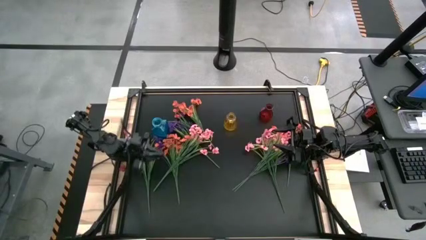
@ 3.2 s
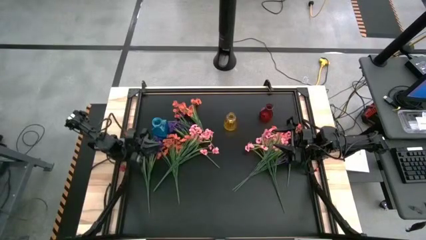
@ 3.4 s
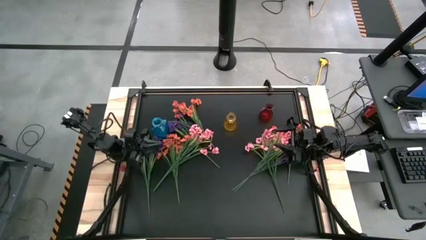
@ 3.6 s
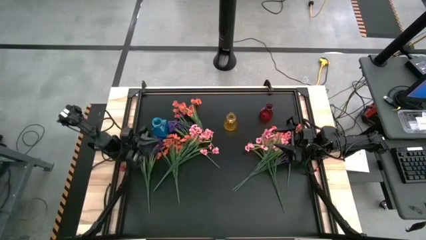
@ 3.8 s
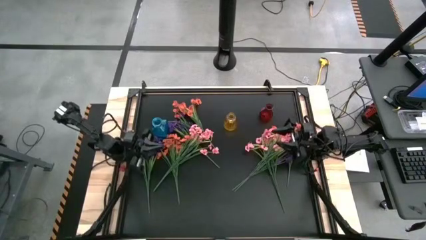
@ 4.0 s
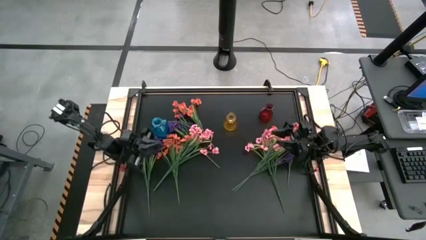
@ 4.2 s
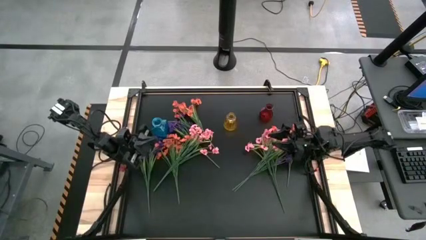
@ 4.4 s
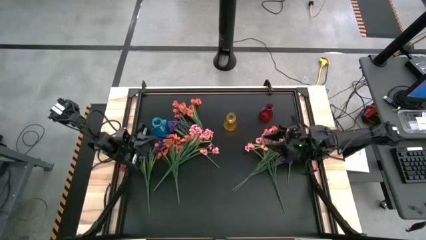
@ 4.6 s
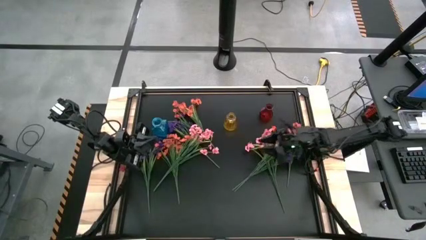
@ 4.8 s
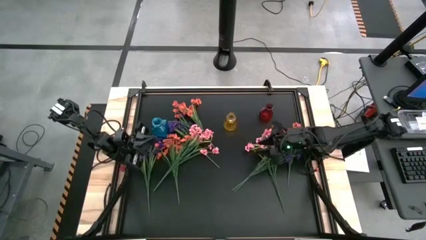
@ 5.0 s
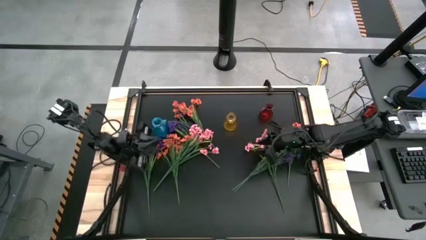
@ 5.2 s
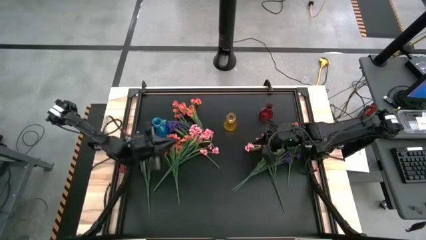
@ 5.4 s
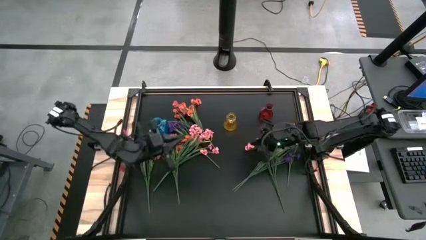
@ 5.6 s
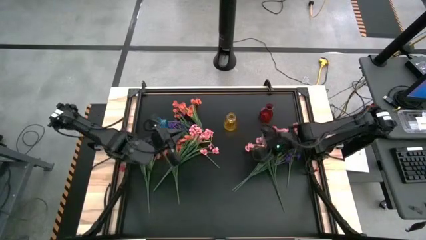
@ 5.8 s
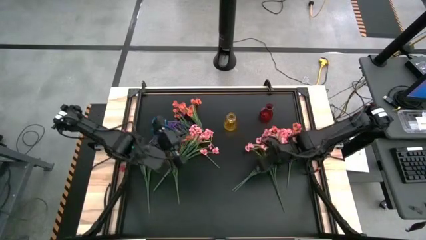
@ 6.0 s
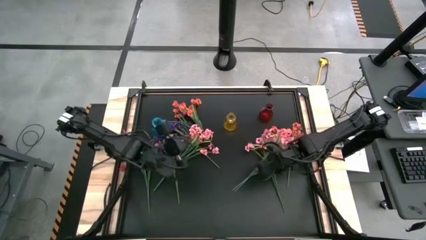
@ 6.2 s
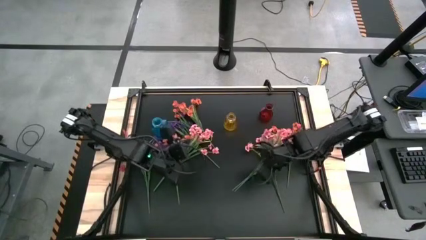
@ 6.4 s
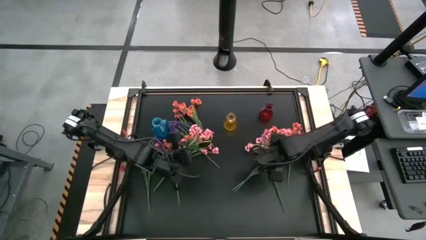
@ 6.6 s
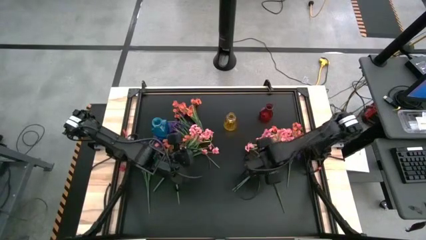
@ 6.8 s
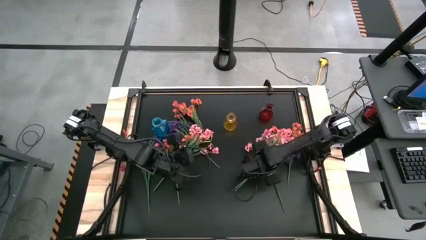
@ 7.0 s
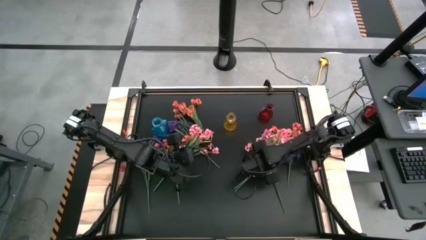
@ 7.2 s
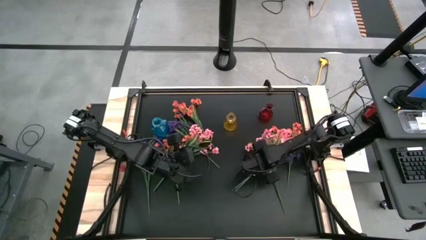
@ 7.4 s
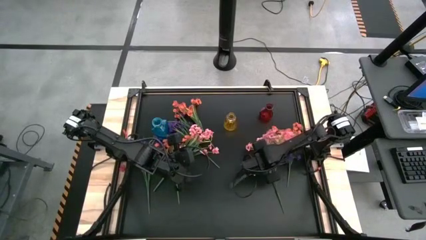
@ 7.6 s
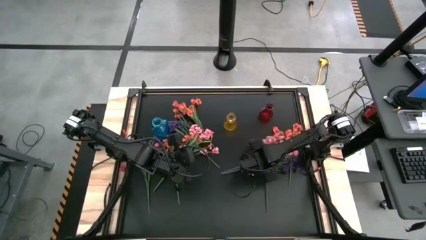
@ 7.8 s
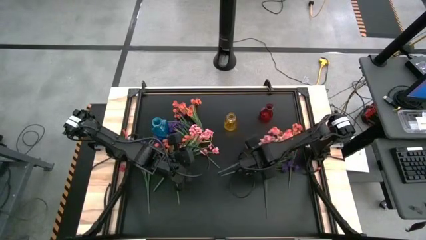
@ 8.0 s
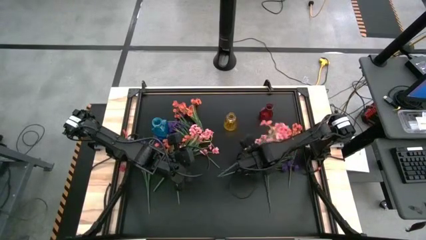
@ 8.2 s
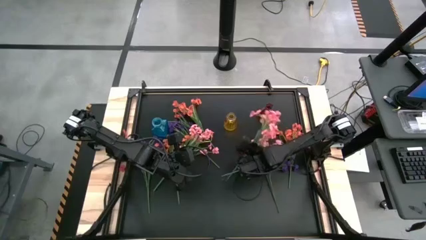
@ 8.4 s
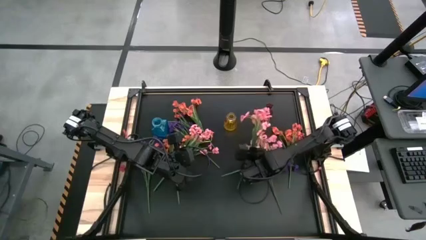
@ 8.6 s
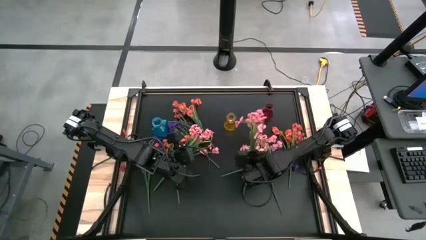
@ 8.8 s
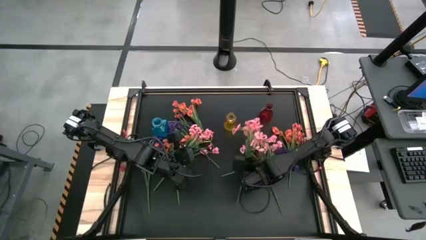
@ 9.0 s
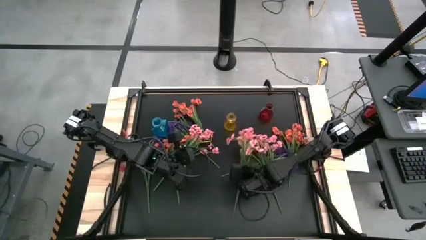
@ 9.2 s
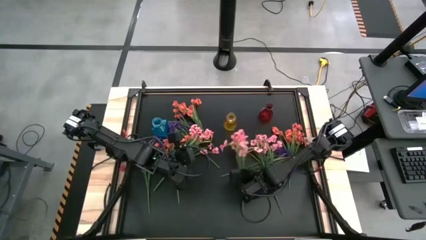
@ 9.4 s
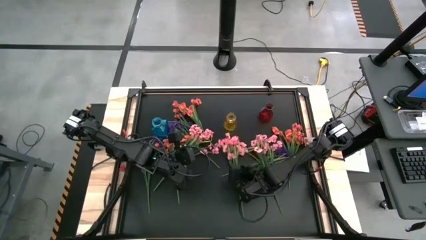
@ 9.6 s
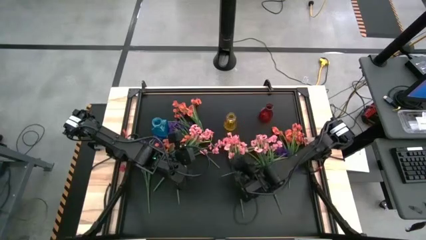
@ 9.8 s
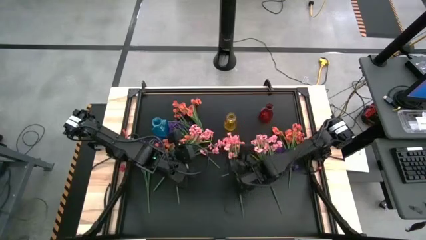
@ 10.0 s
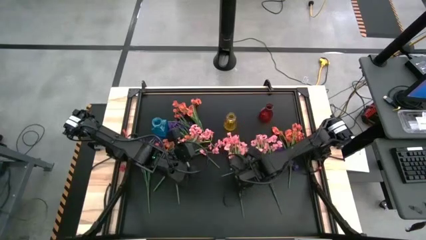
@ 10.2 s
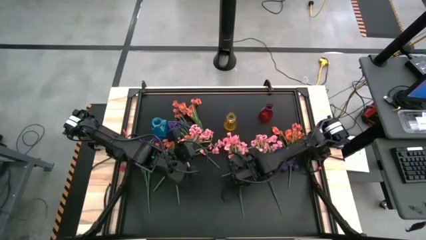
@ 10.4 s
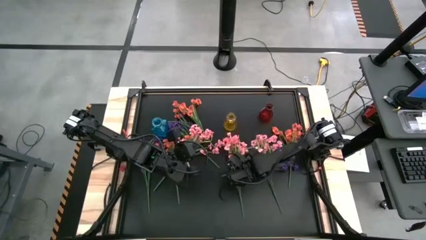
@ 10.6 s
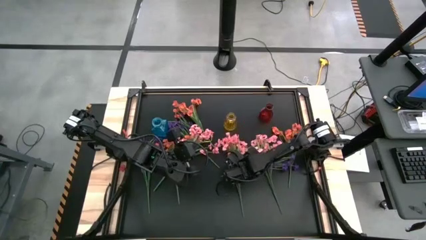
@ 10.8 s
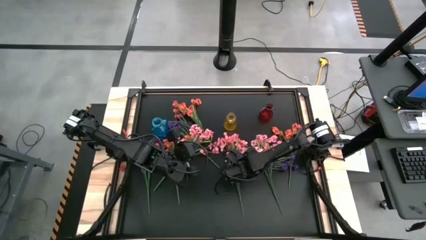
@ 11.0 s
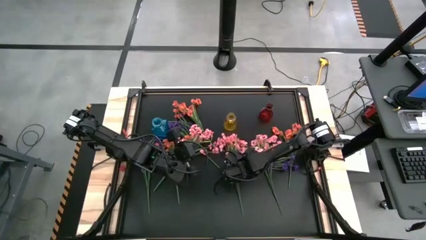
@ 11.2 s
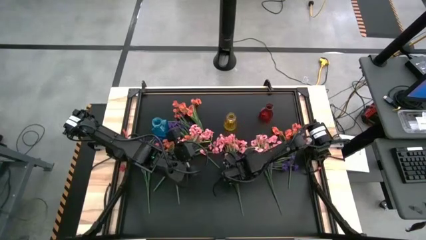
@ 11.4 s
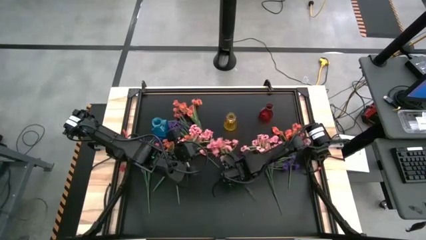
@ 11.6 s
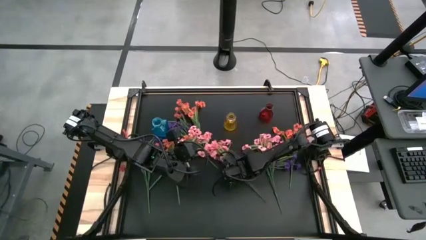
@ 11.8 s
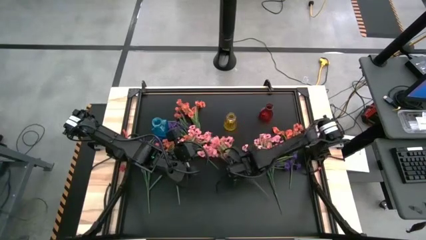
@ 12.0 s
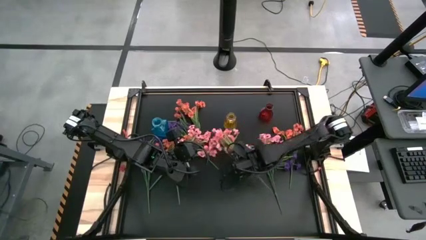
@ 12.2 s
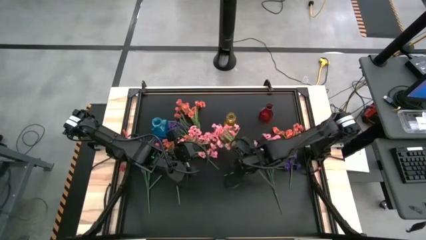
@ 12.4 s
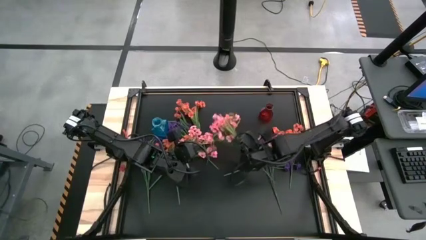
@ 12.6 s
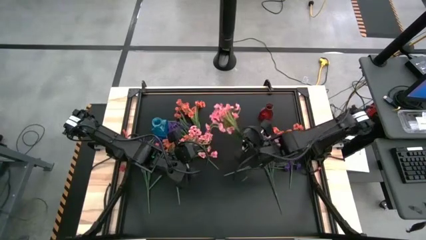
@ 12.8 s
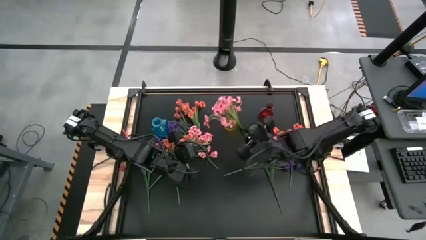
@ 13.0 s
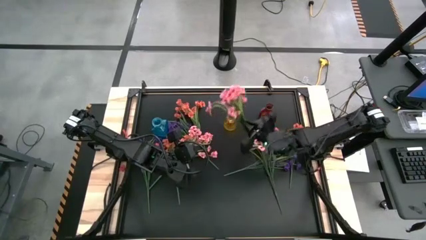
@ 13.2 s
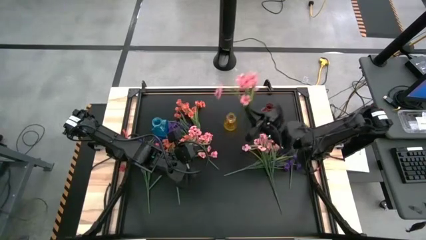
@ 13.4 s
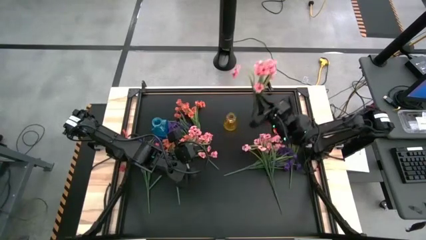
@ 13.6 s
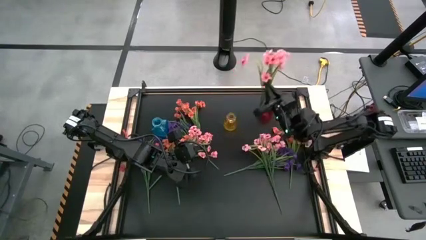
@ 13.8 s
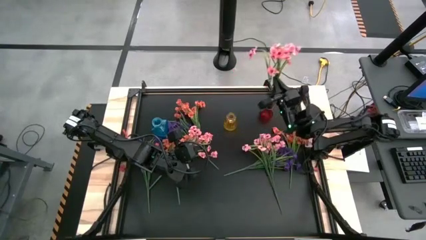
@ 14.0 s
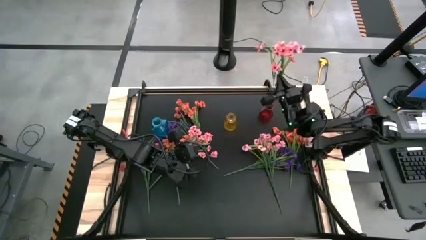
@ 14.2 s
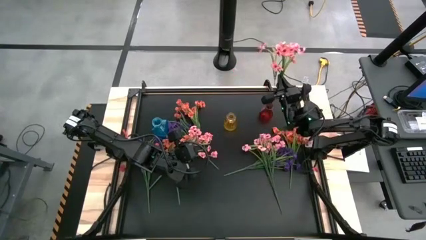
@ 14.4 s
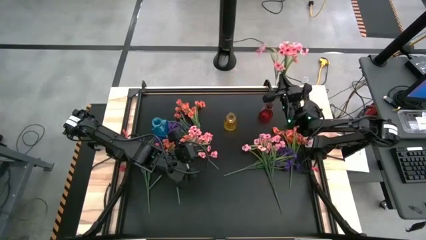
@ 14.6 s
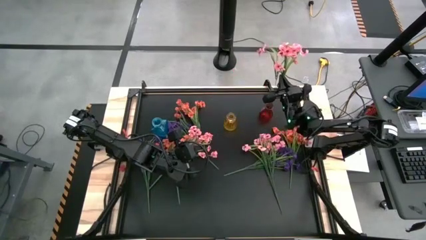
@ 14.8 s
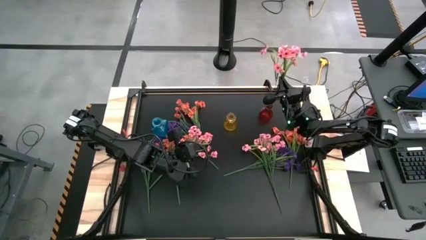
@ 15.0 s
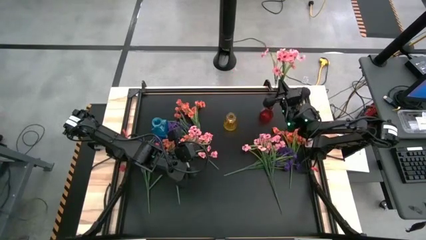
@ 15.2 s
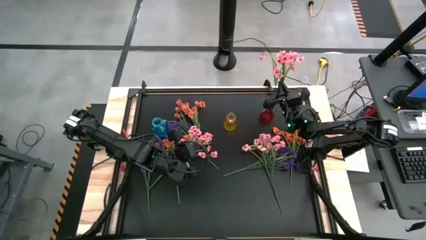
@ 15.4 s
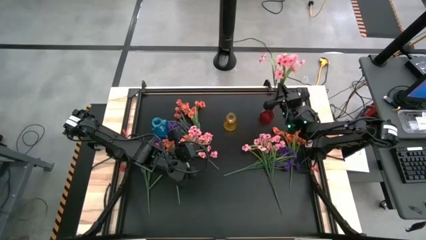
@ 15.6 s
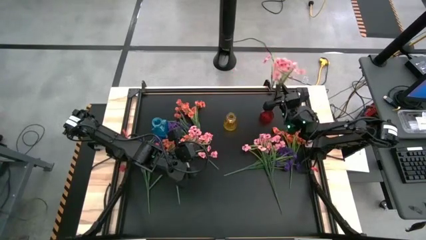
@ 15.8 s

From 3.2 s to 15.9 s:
Task: Sort flowers into vase by color
Put the middle pink flowers into the red flower vase
